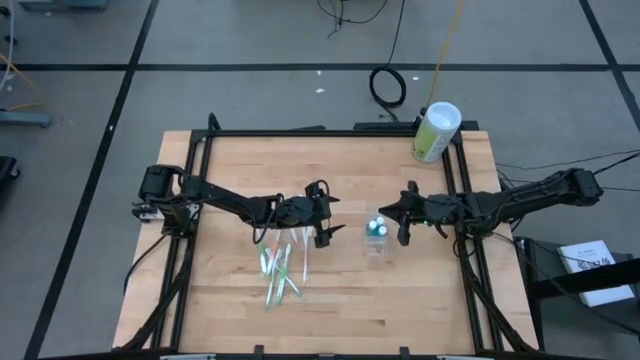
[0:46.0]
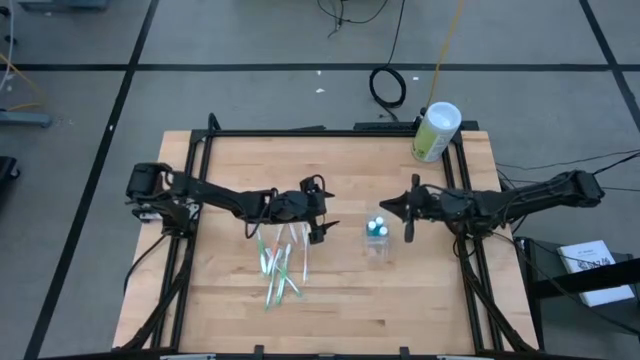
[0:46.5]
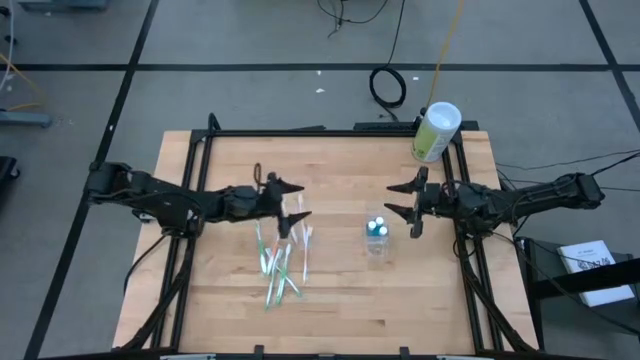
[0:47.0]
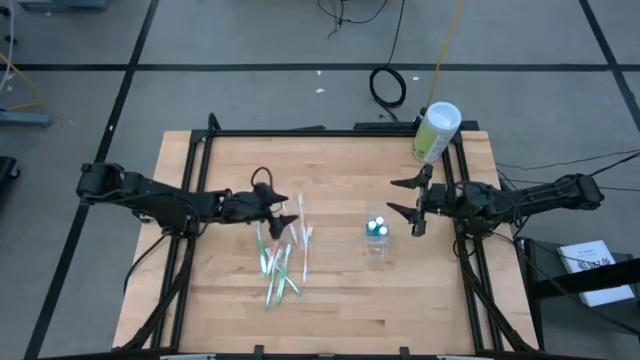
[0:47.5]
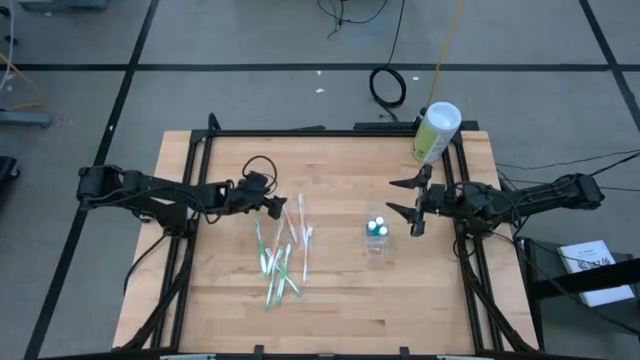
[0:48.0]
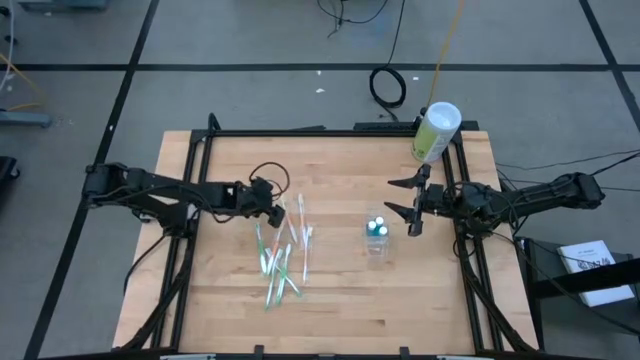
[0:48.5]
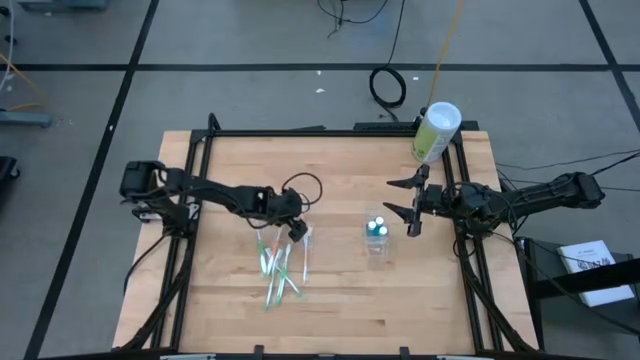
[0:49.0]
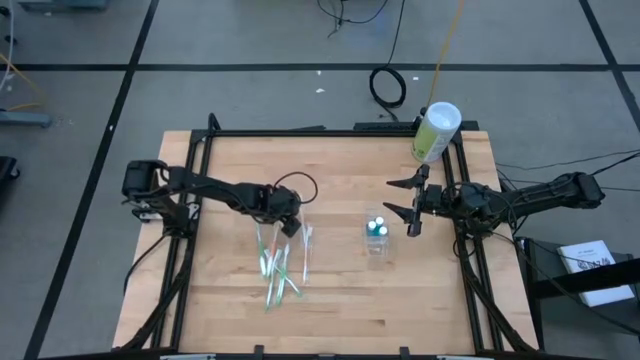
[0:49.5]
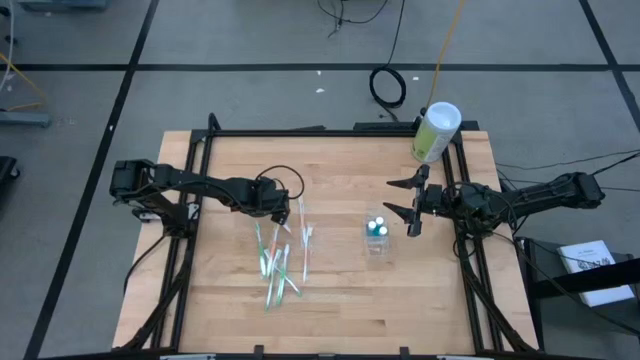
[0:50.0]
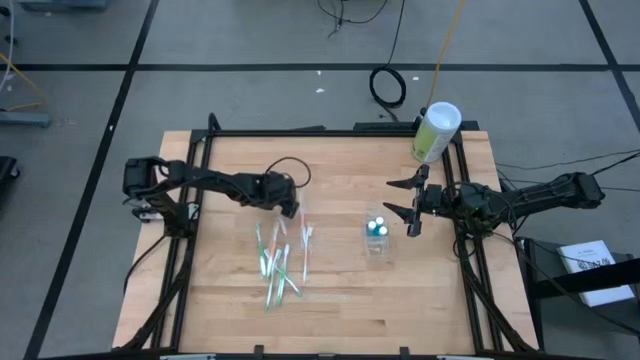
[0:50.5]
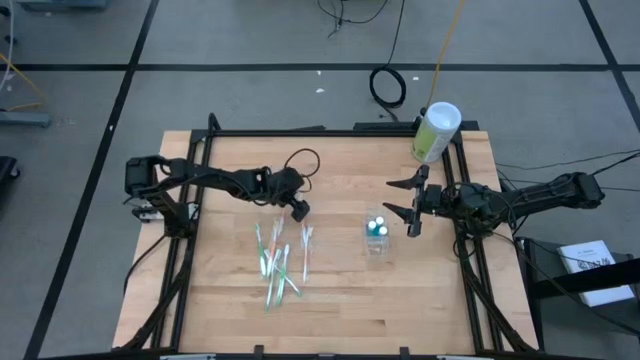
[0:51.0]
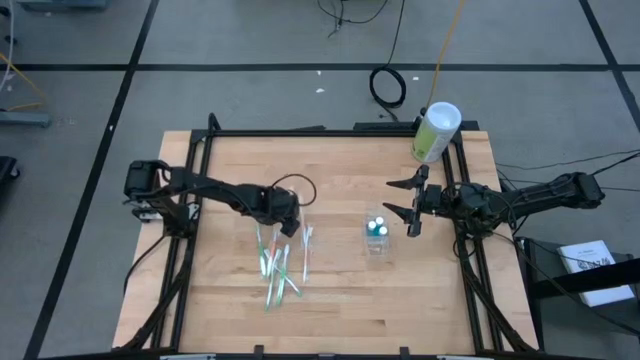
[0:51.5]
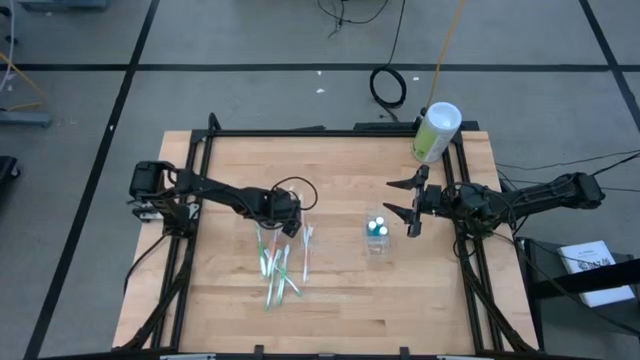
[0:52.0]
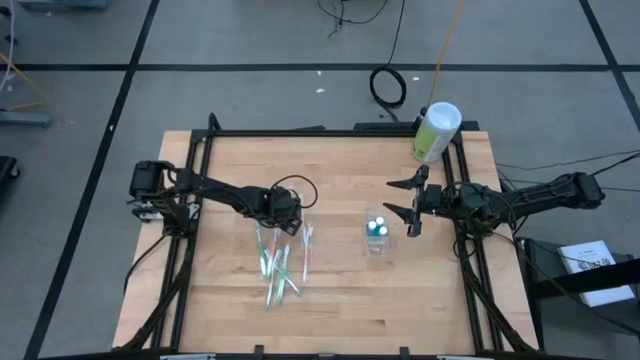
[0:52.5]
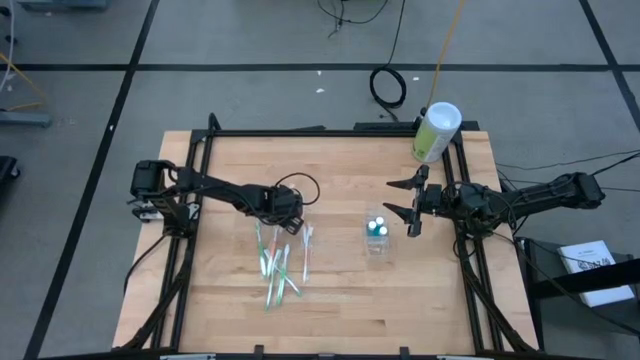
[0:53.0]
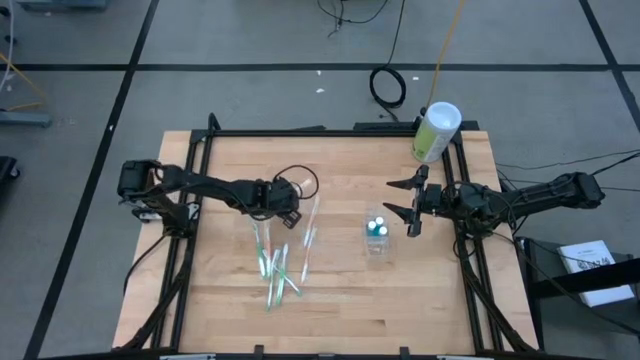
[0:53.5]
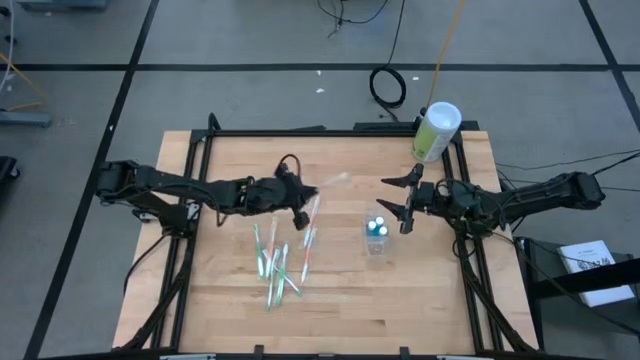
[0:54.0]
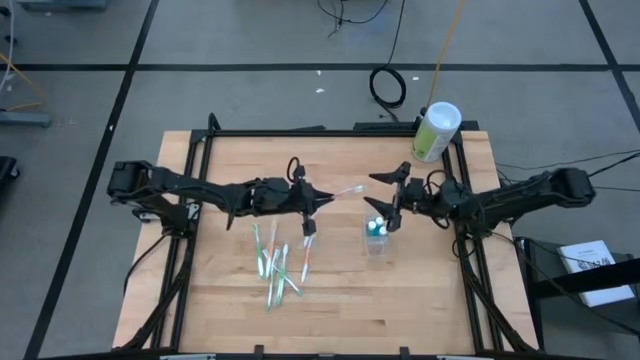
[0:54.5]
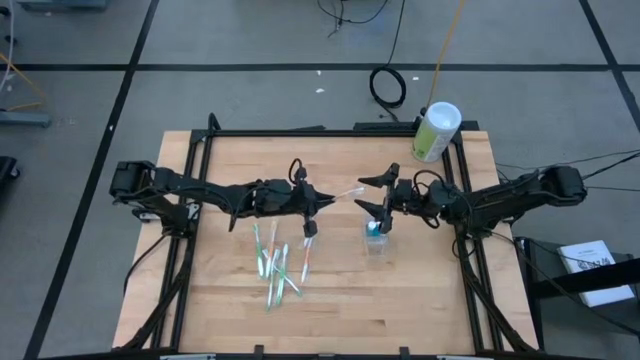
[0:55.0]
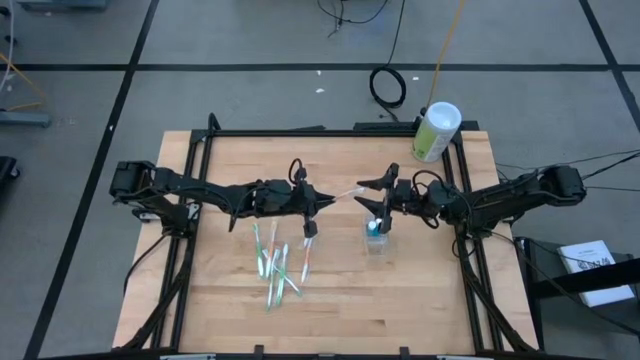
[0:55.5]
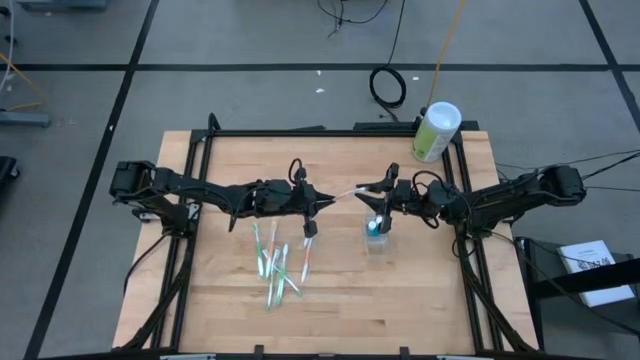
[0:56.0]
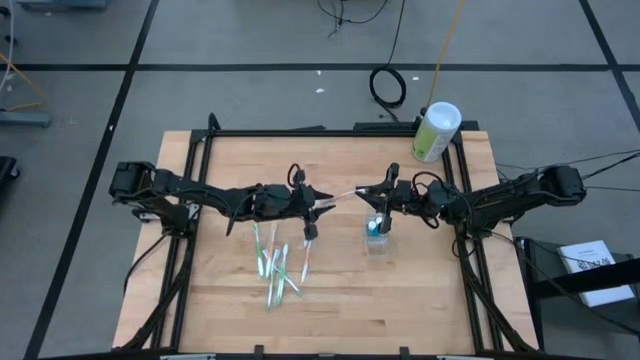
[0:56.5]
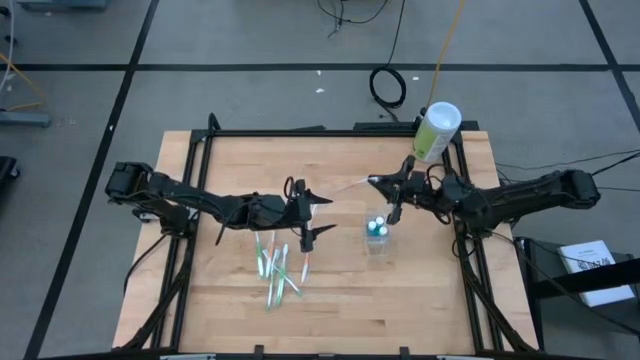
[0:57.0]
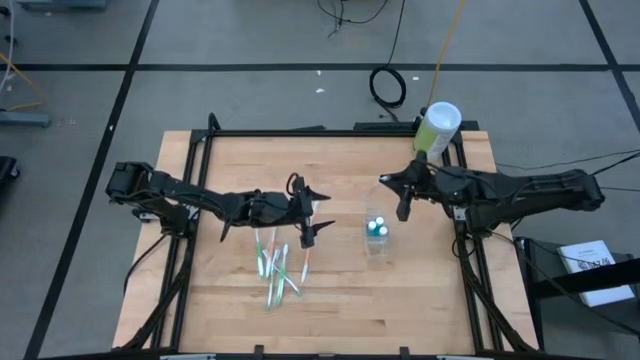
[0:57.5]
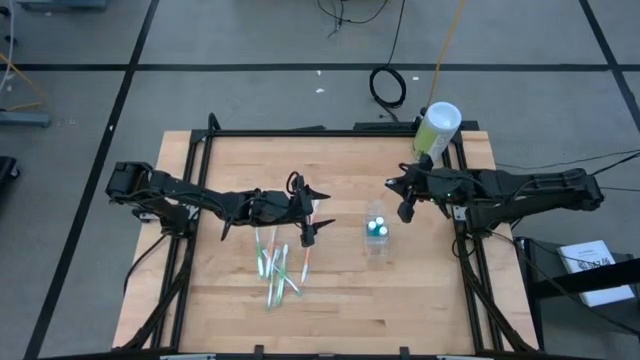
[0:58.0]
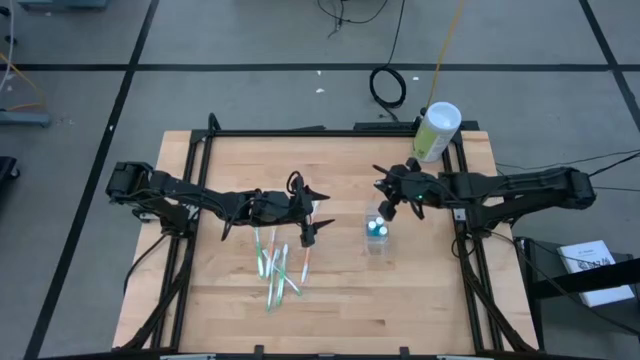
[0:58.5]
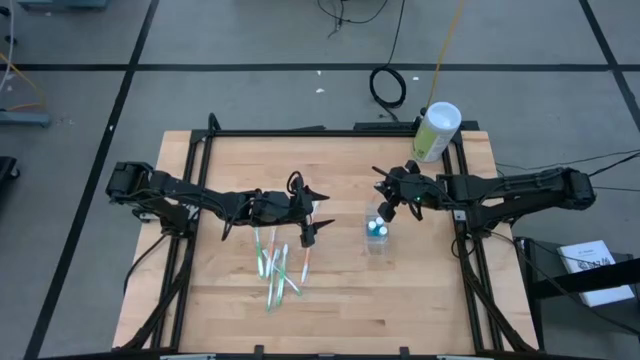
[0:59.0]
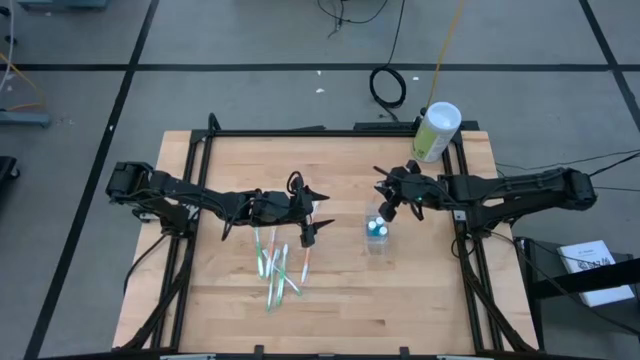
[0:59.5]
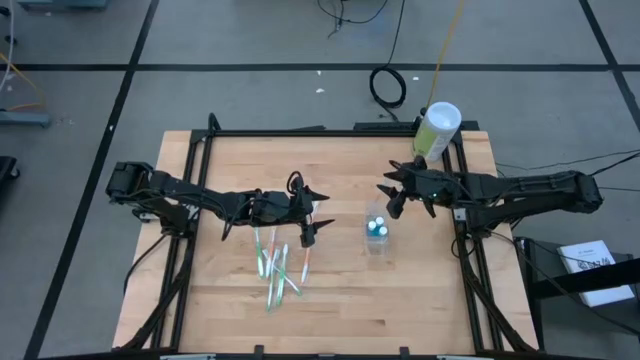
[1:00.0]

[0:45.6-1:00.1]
Task: Pick & Place toothbrushing station
Put the orange toothbrush into the top of the transparent organizer

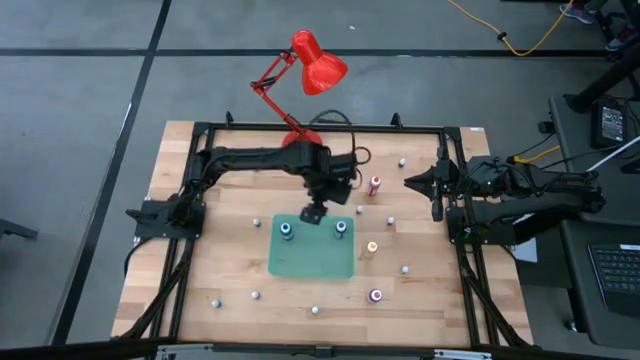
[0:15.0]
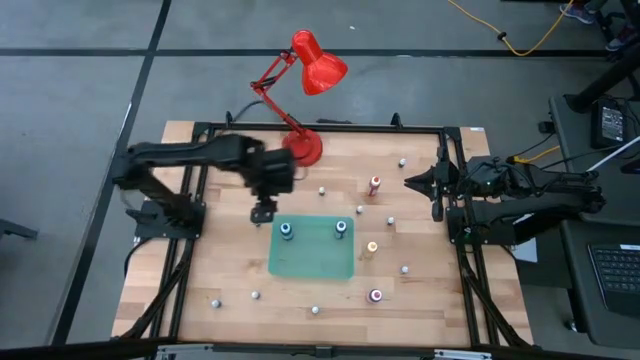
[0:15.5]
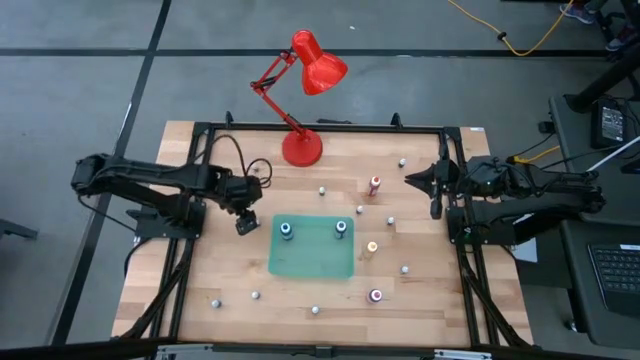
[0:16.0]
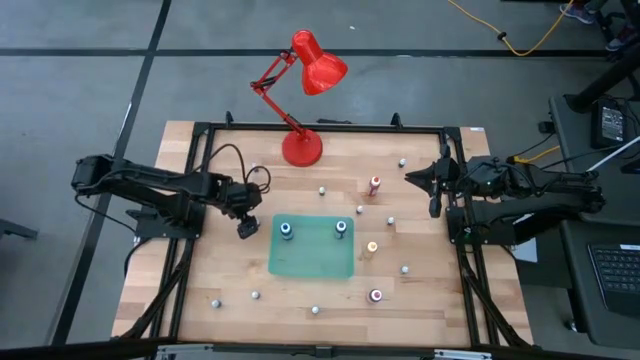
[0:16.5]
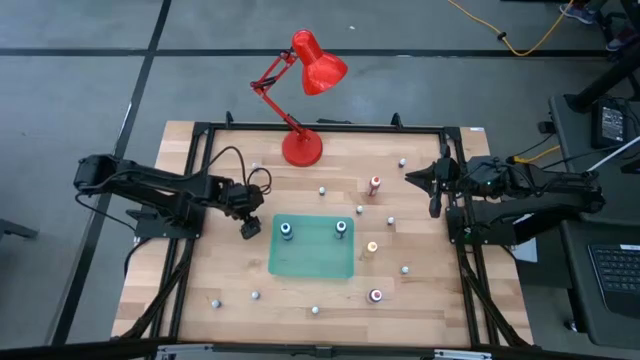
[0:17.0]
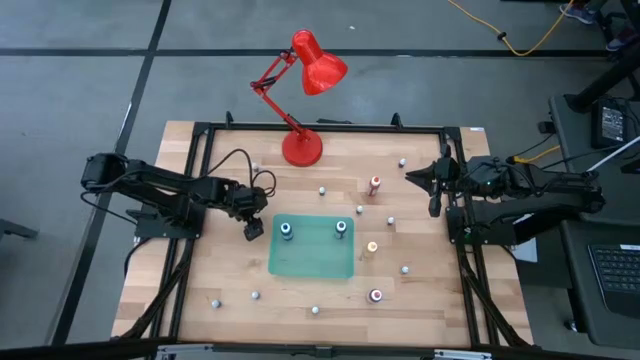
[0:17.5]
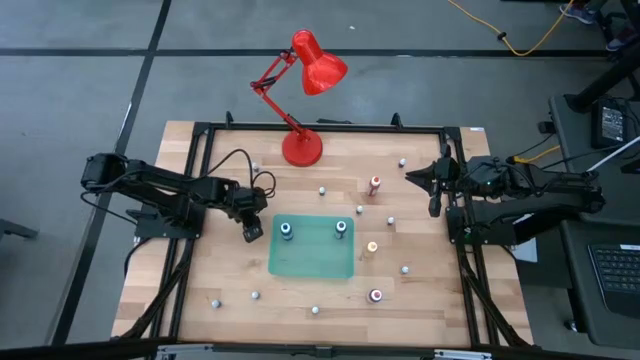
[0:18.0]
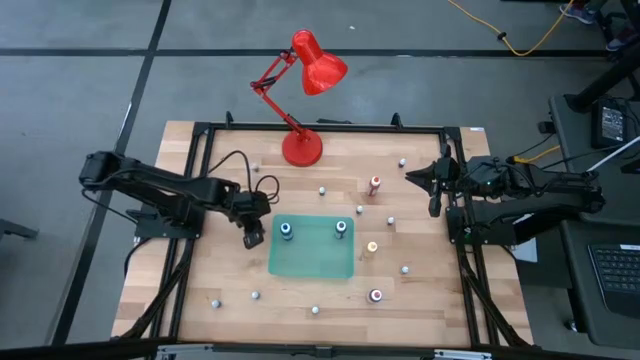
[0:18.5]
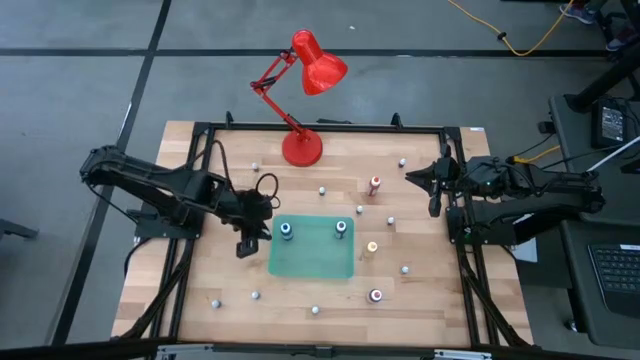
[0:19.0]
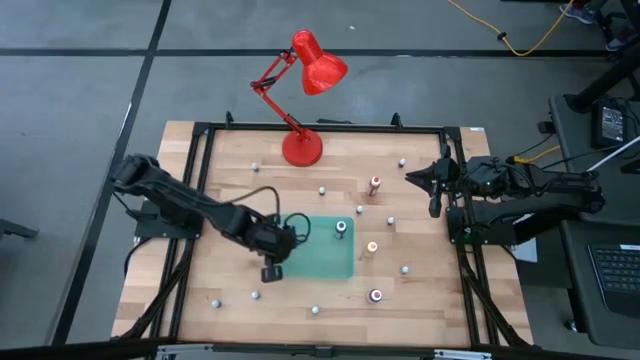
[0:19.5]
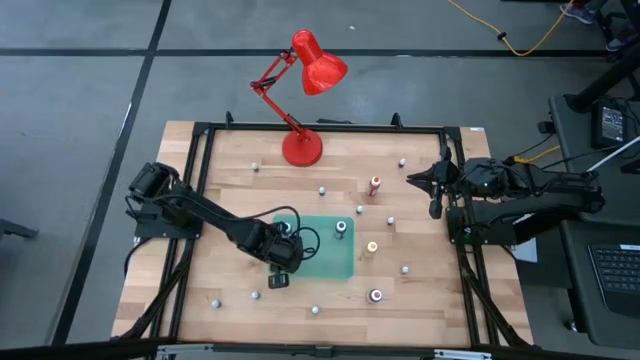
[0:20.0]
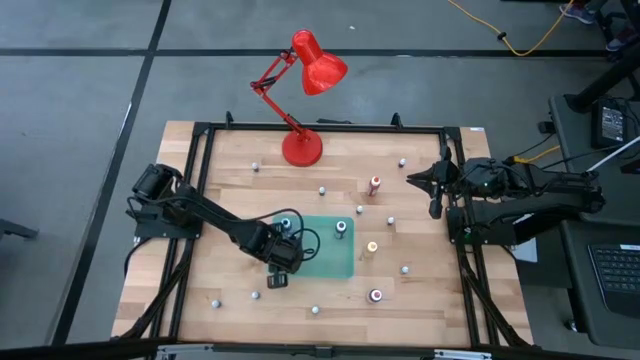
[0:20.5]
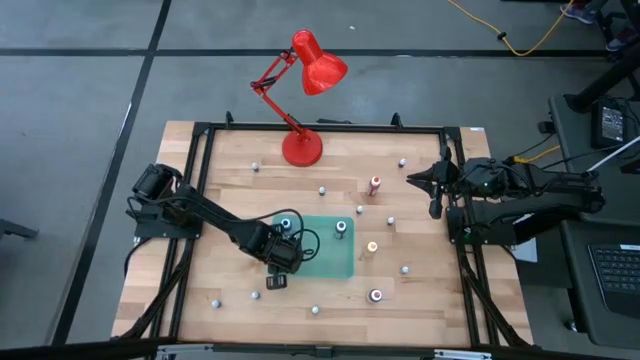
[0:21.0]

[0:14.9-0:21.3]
Task: Pick & Place food coloring
Put the small top blue bottle into the green bin
